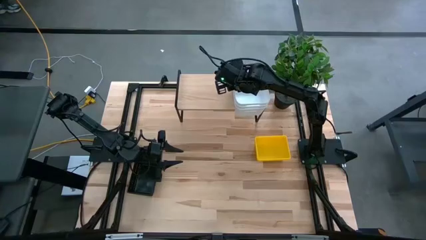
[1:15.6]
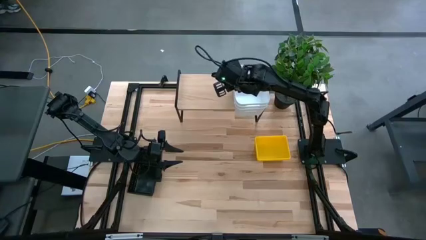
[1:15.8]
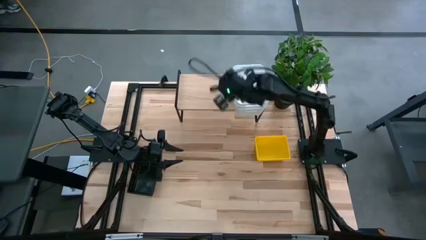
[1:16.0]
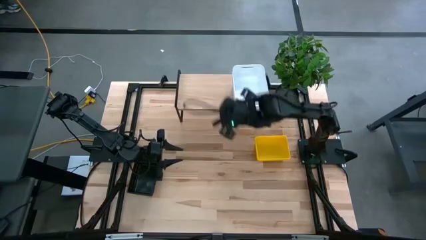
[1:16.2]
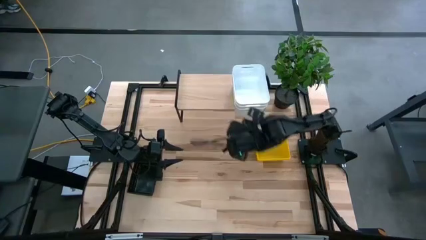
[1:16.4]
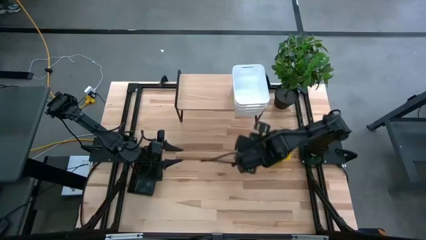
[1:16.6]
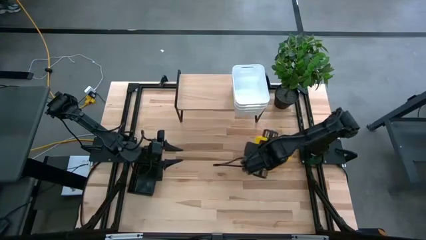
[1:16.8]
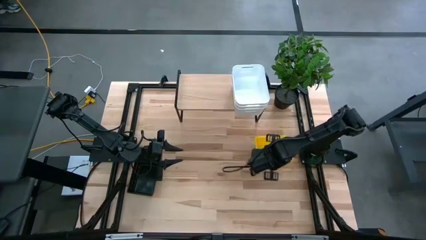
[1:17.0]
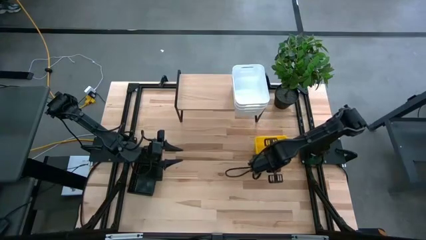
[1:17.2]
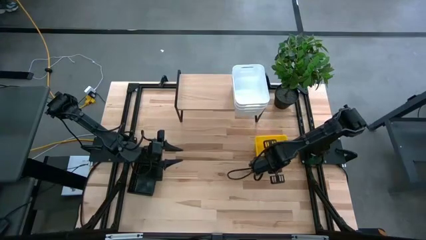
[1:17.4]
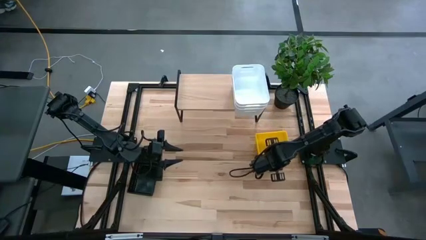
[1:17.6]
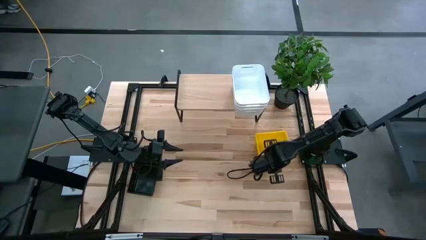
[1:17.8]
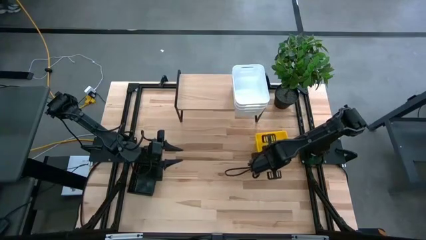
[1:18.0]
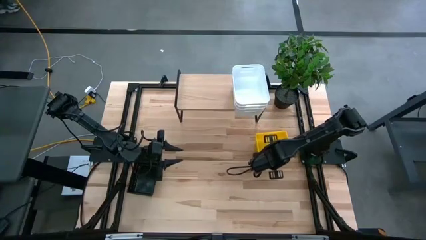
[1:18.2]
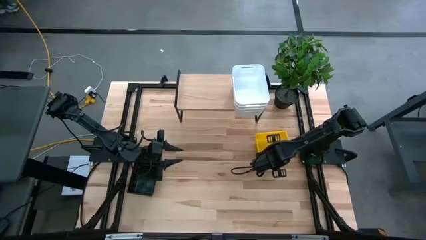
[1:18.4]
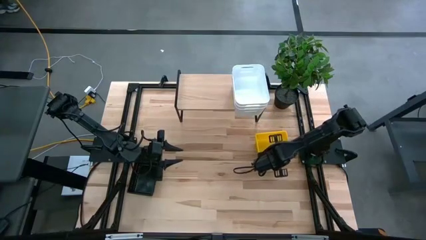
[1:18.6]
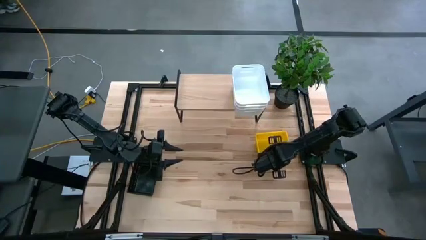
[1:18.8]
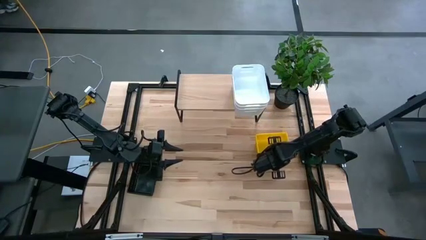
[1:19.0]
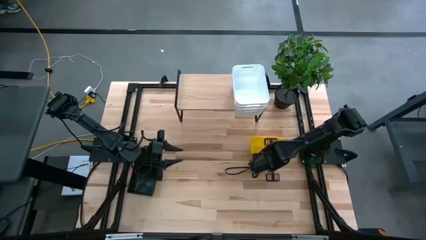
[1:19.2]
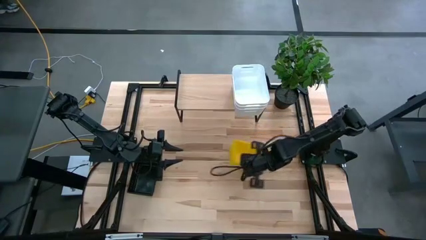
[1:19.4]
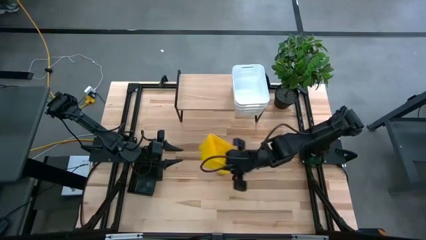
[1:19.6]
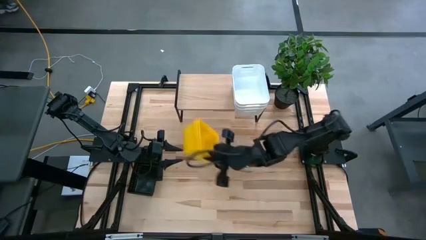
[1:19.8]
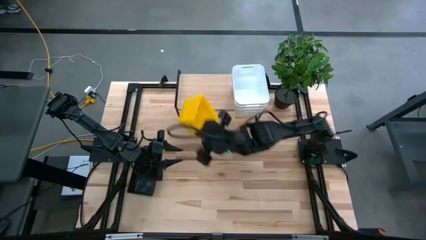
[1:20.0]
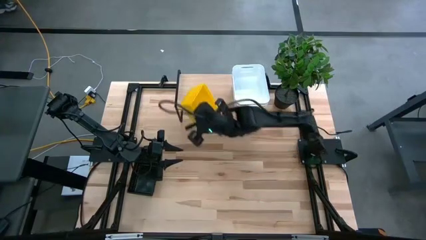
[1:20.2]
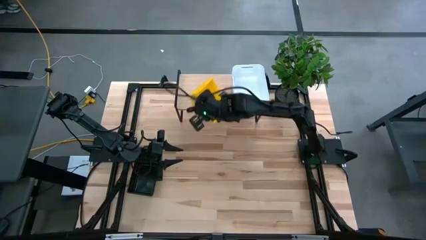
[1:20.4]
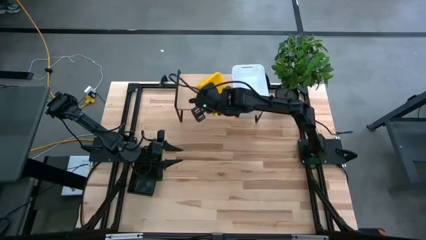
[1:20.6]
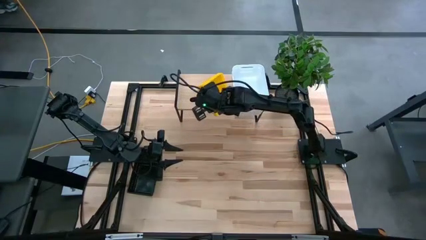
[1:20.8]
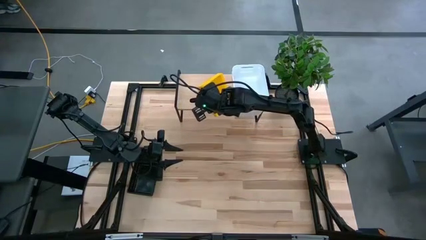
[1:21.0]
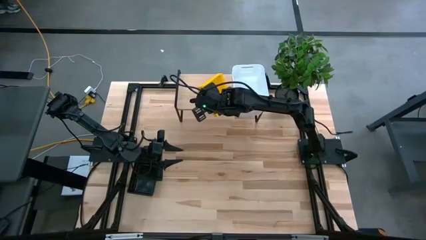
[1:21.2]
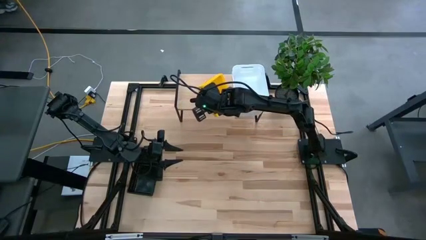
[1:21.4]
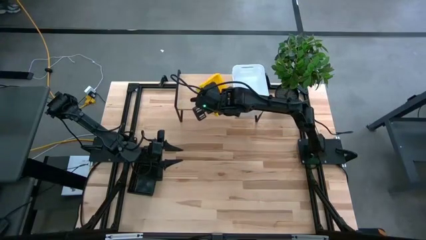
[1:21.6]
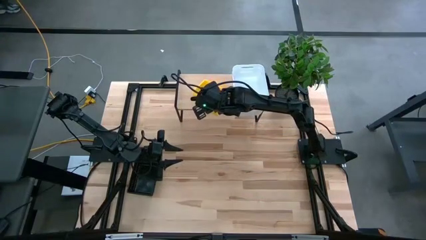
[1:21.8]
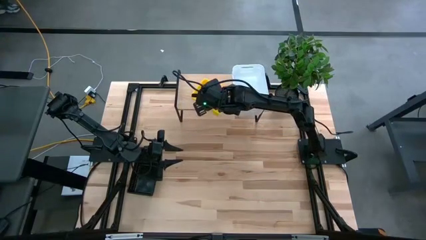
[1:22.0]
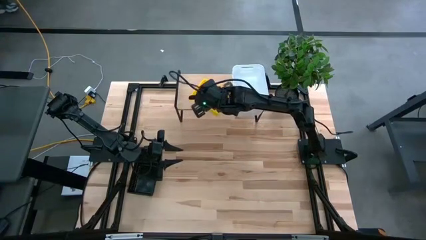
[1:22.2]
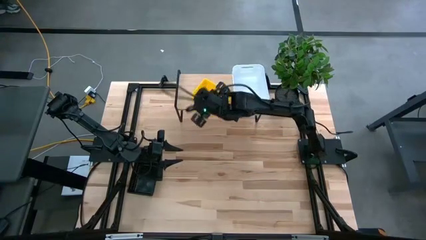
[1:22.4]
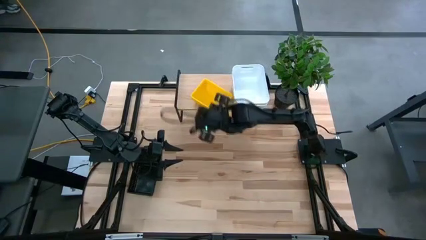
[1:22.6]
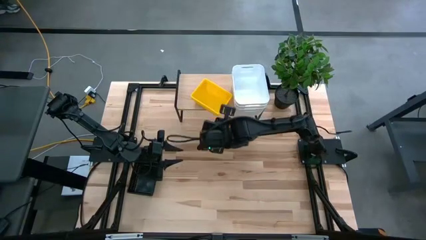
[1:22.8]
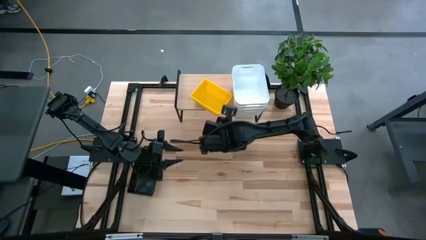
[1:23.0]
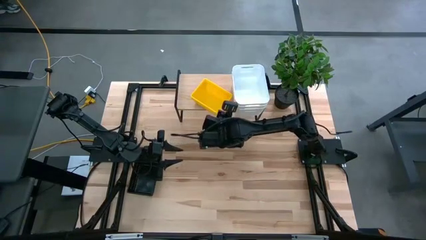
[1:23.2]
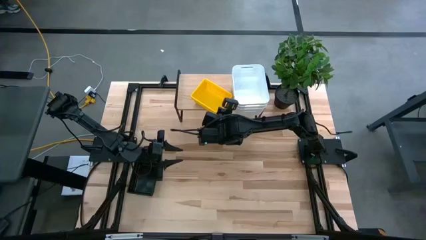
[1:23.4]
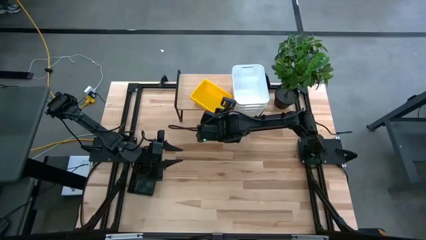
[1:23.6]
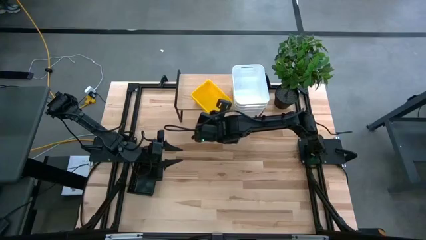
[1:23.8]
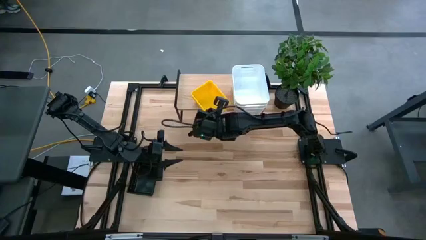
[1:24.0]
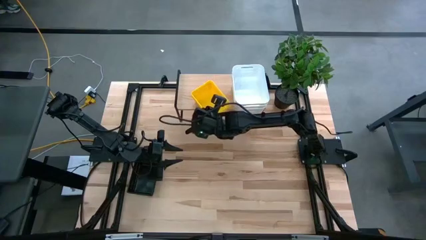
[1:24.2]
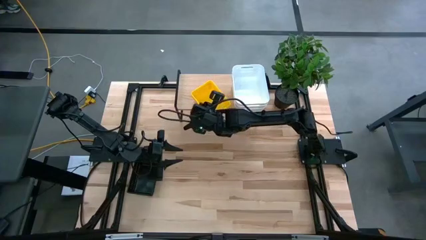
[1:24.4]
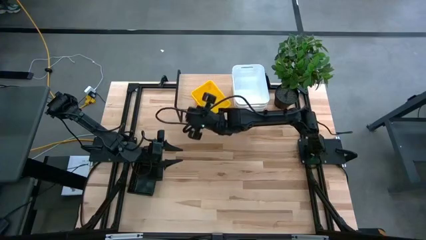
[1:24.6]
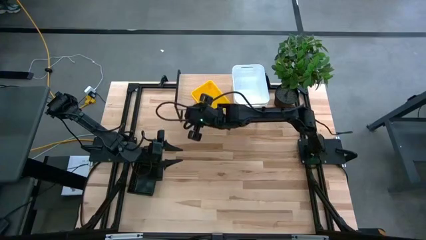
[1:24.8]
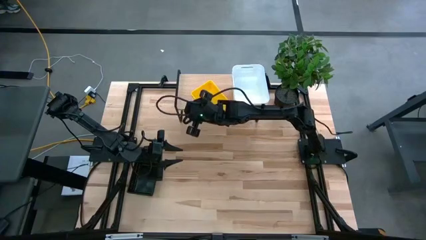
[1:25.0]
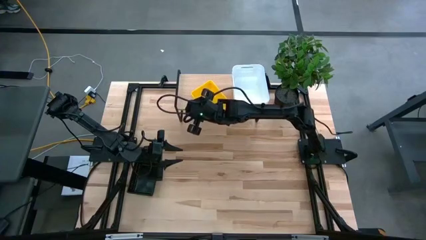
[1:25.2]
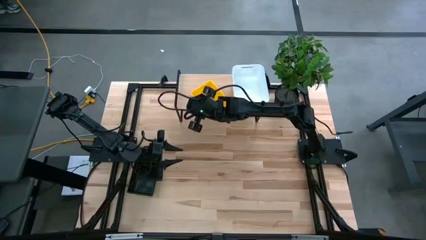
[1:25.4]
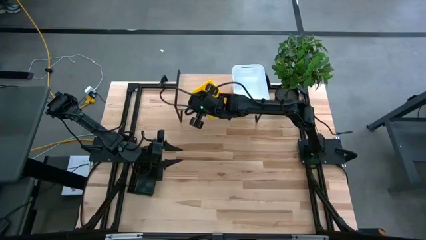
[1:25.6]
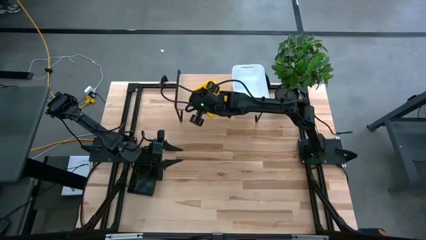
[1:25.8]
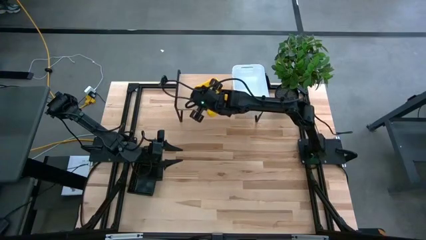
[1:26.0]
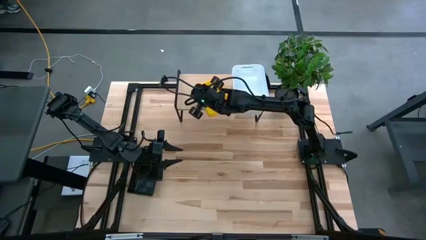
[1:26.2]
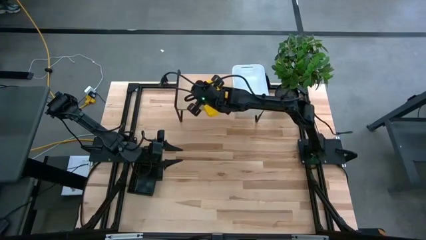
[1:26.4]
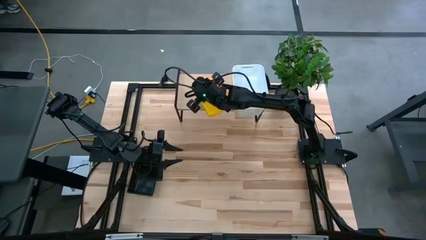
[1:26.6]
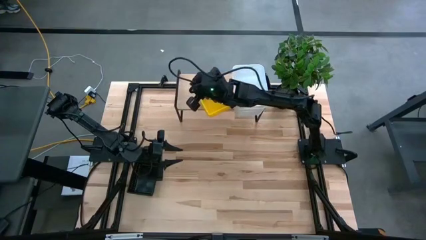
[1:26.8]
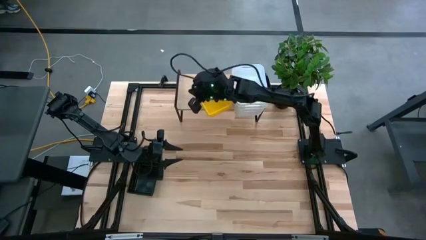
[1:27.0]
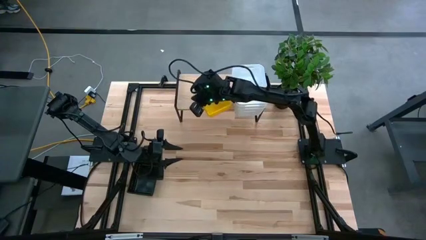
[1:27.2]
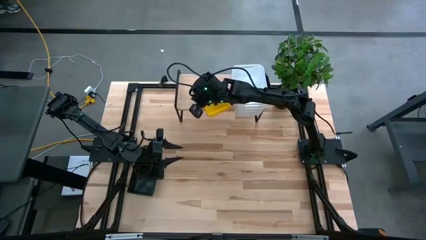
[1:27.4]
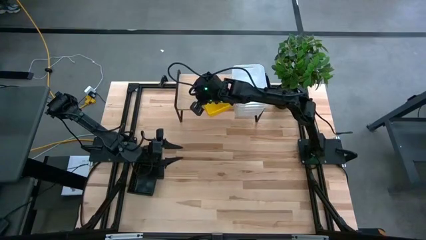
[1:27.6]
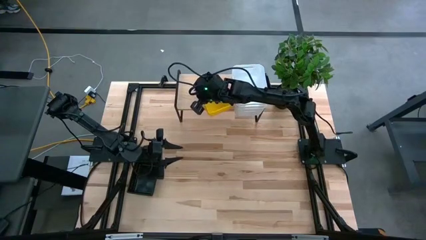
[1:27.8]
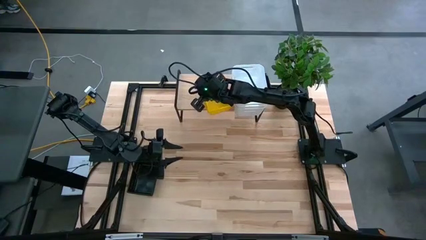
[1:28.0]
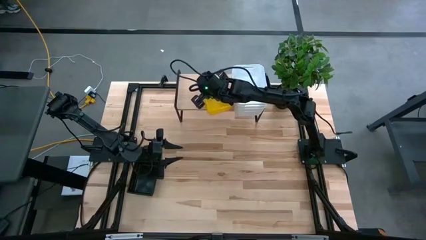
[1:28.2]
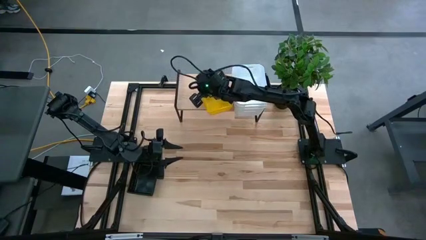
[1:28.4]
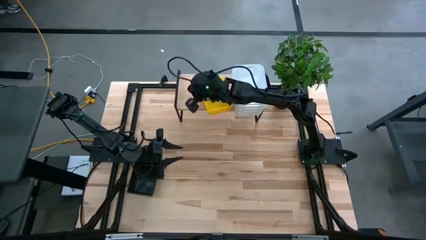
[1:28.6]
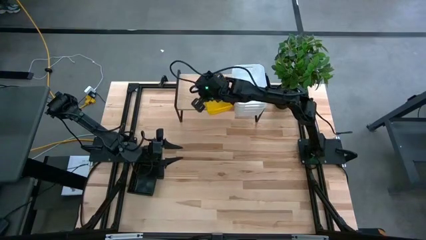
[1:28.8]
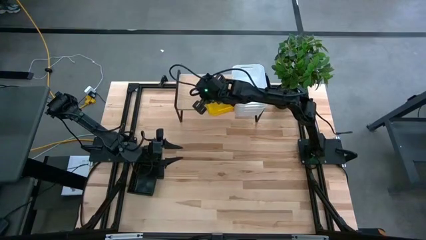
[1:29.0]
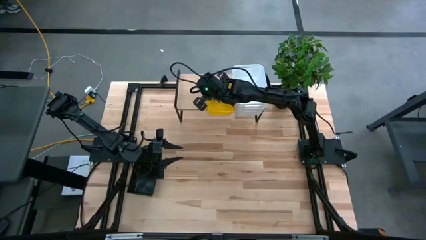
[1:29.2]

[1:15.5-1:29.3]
Task: Stack baskets on shelf by color
Put the stacked yellow bins on the shelf

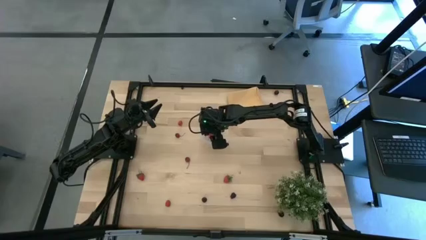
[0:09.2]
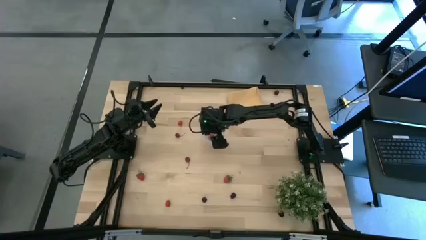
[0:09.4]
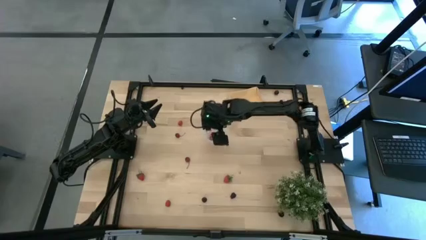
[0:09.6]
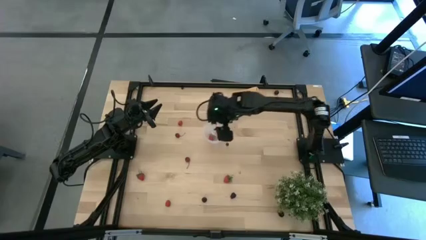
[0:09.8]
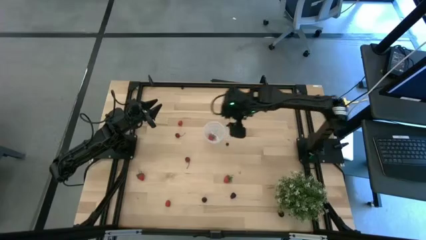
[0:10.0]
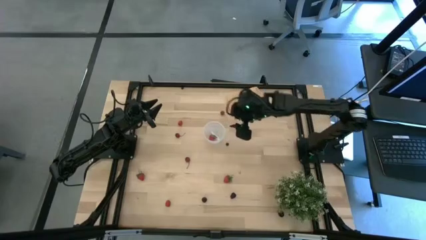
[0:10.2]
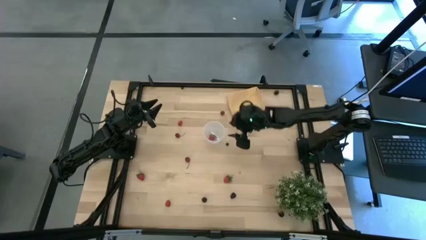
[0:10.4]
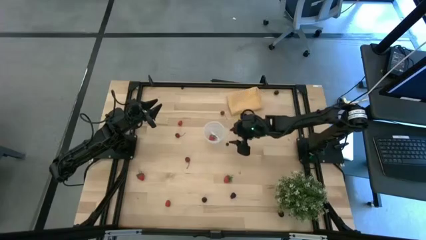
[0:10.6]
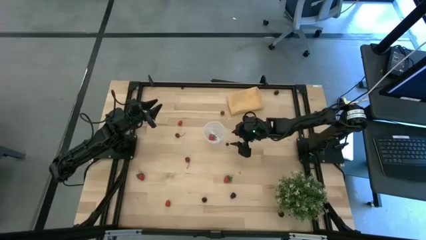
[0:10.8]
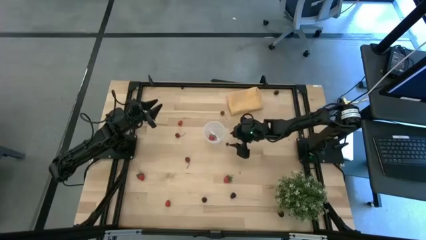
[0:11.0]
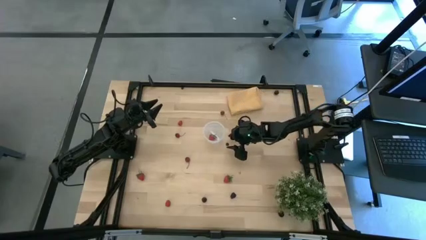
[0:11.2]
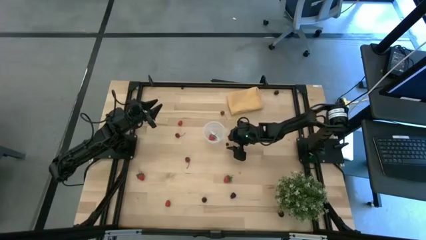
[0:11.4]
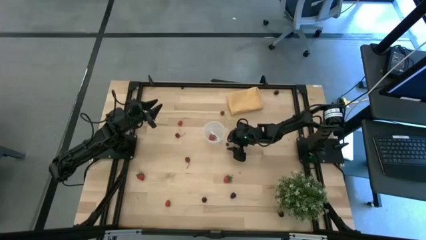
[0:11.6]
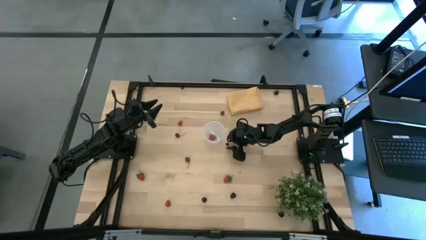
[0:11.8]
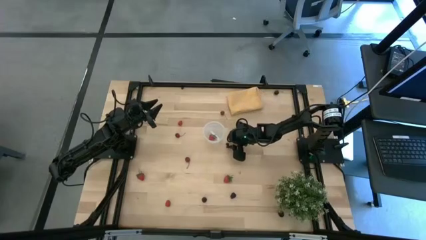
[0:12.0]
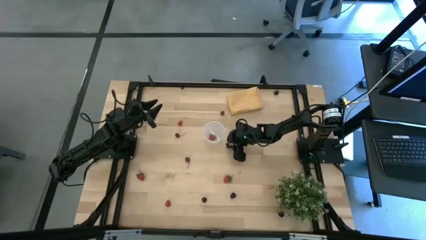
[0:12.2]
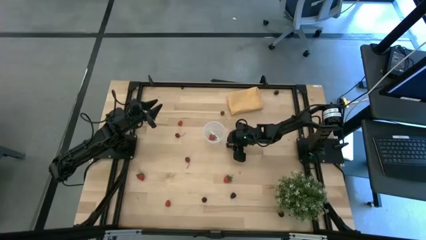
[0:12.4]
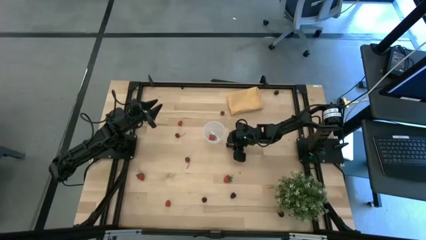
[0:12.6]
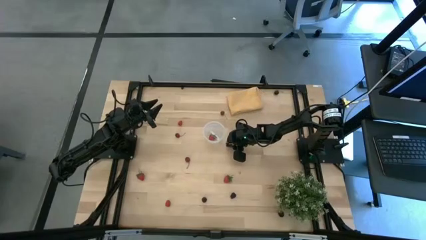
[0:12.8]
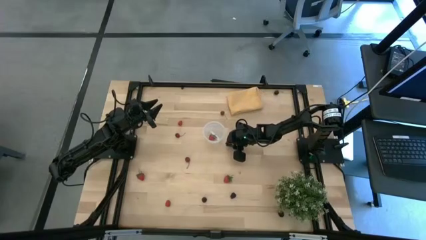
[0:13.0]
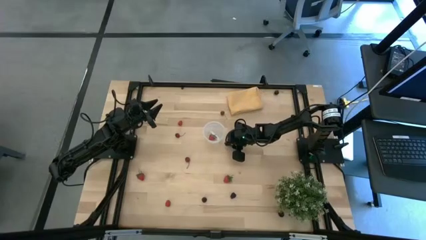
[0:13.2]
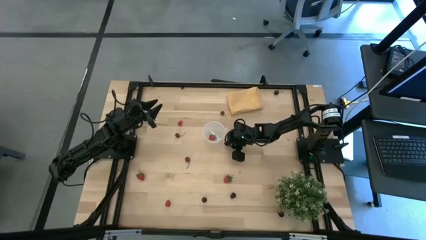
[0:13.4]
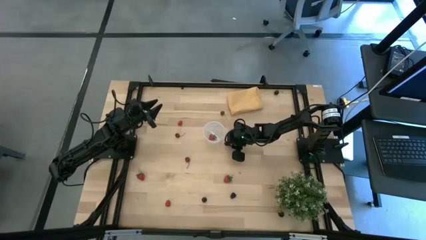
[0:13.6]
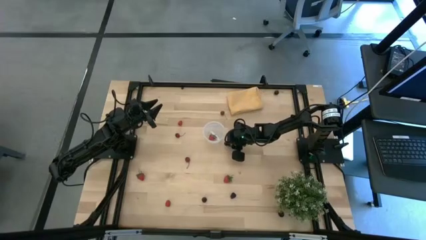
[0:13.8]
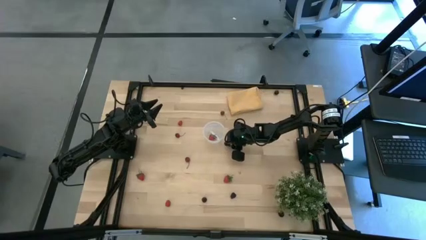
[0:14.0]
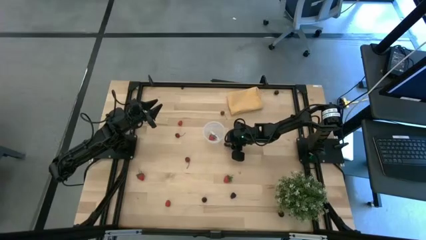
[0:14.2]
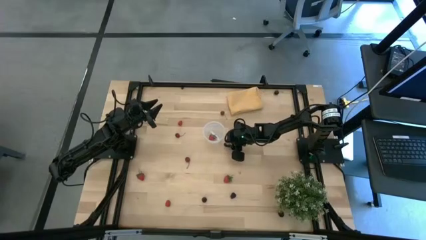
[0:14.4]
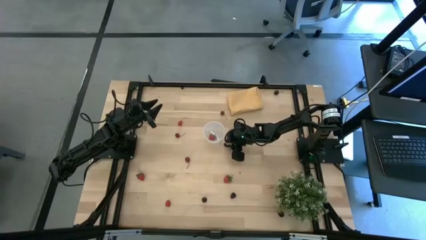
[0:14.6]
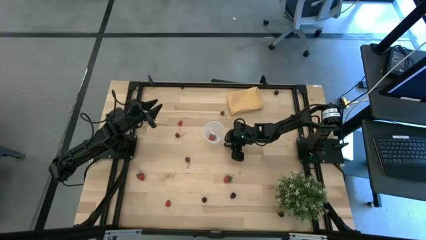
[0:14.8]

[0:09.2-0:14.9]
Task: Pick and placing Produce into tupperware
Put the bottom blueberry into the transparent container
